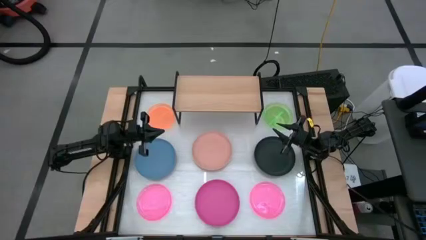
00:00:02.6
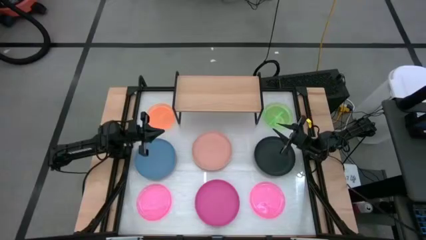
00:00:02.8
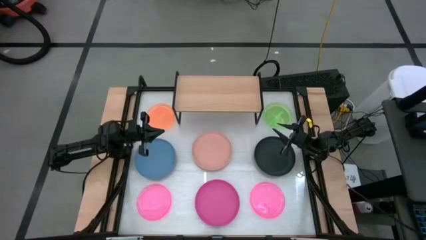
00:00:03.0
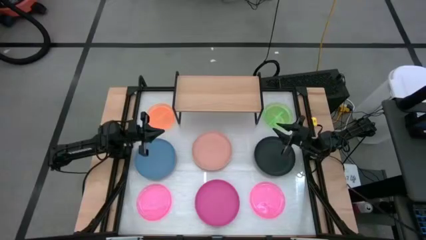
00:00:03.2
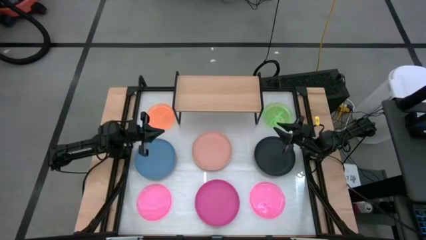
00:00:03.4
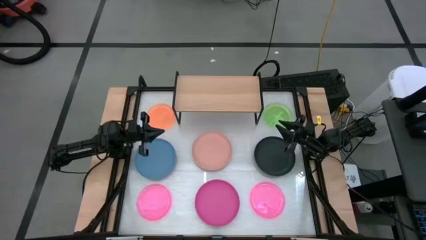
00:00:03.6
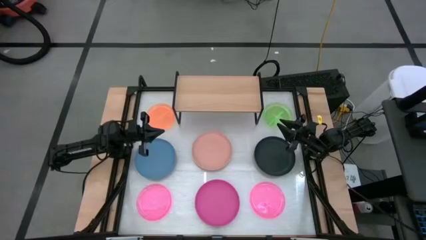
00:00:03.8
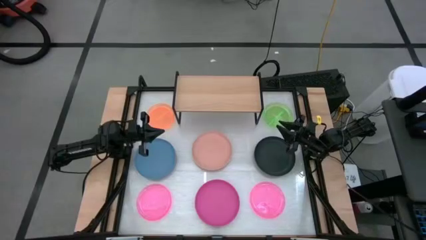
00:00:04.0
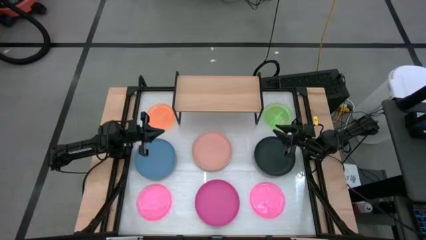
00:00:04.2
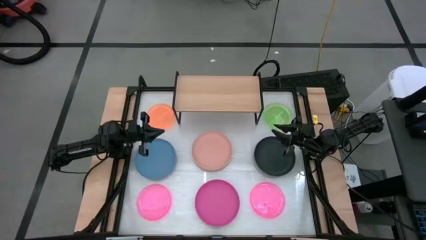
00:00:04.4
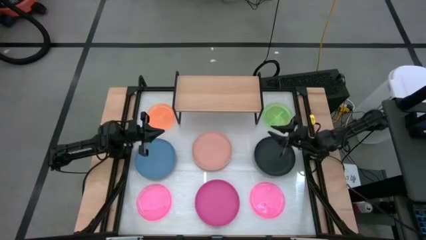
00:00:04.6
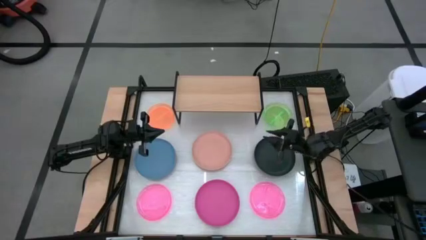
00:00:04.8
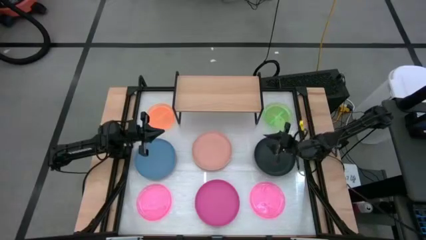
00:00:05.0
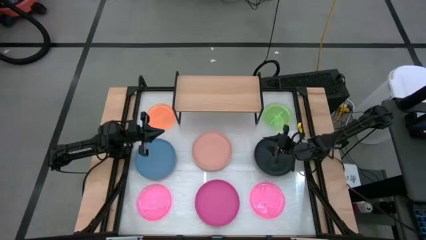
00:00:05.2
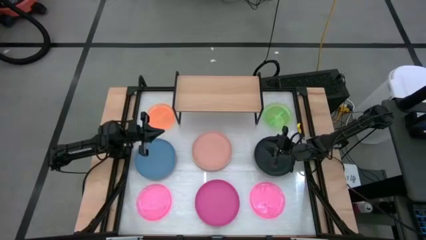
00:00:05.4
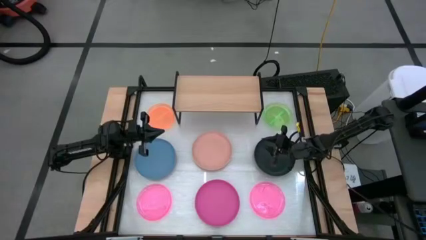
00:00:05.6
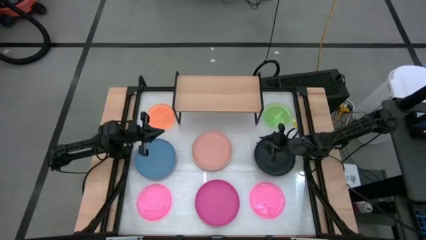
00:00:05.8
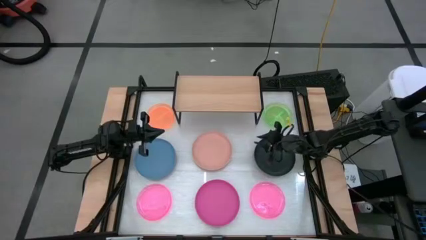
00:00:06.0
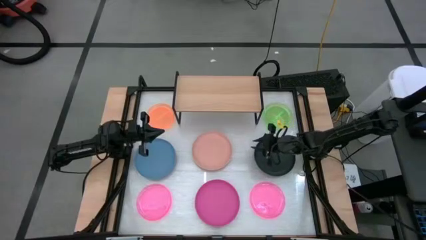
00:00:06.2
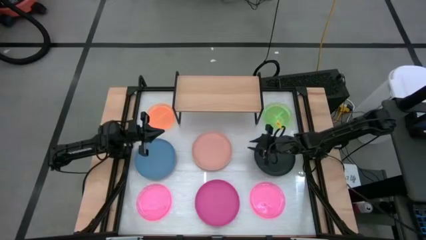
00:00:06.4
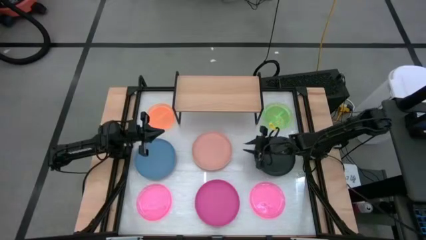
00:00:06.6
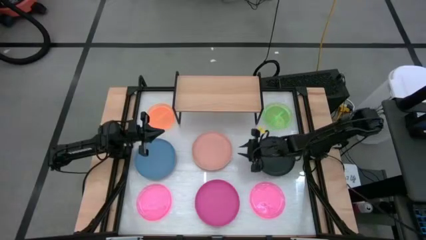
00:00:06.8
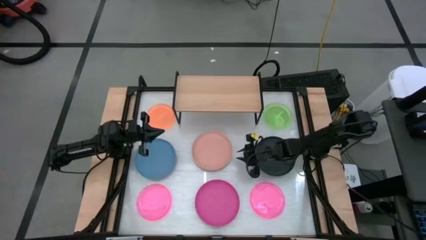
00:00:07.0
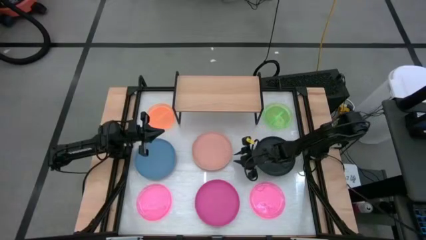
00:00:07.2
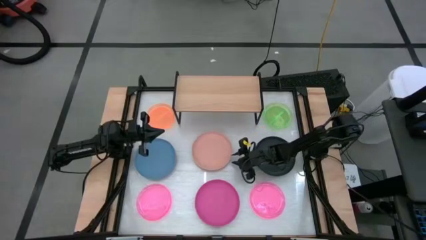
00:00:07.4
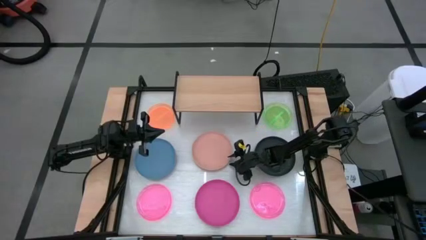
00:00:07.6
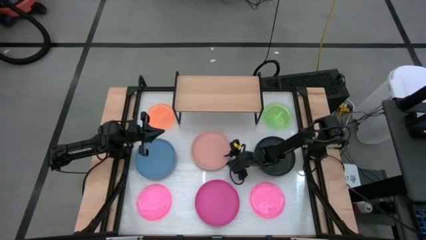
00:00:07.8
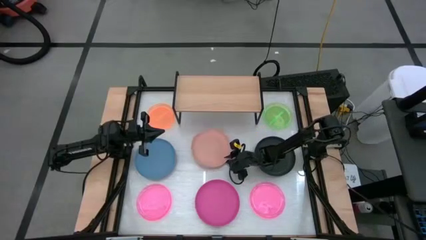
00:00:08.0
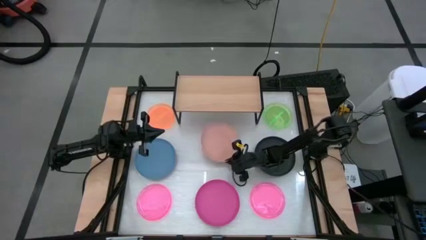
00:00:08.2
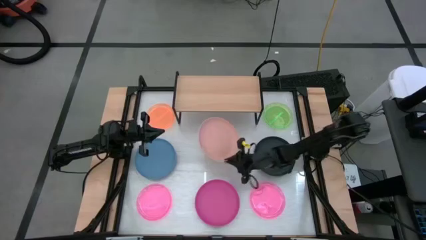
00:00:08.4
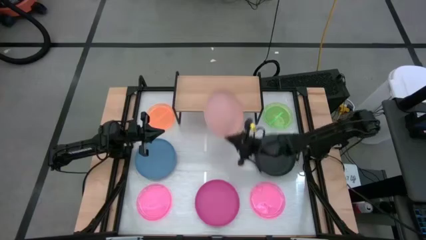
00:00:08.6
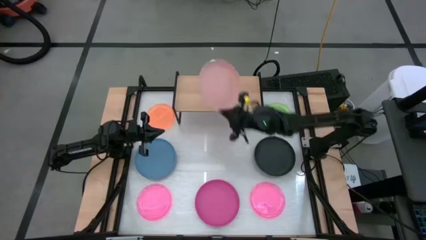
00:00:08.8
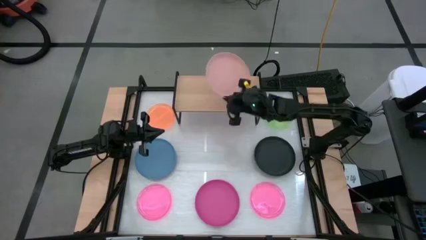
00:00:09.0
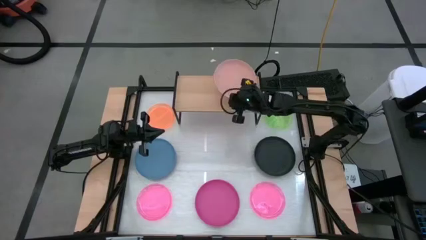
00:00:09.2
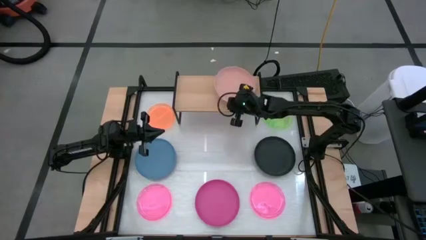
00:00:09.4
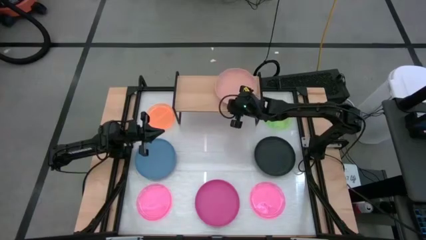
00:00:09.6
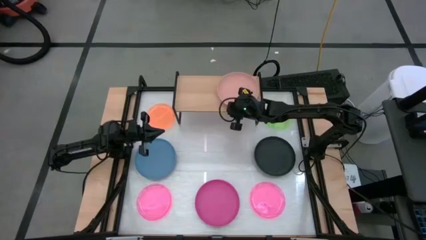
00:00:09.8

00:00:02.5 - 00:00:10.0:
Task: Place and stack plates onto a shelf
Put the large light pink plate on the shelf

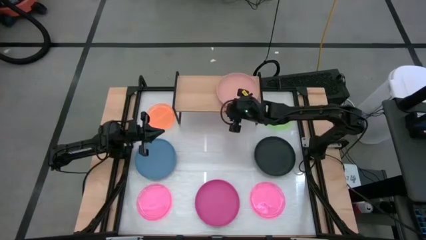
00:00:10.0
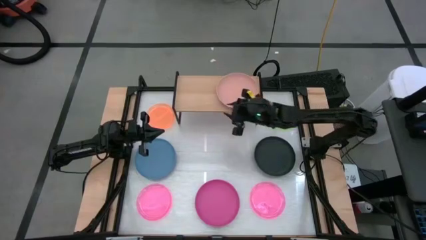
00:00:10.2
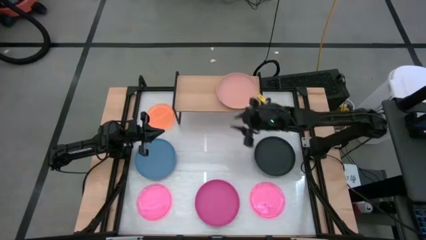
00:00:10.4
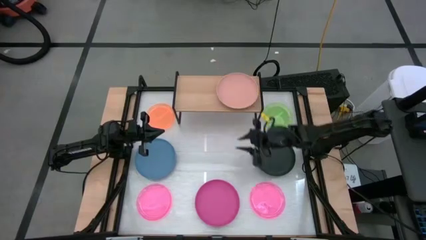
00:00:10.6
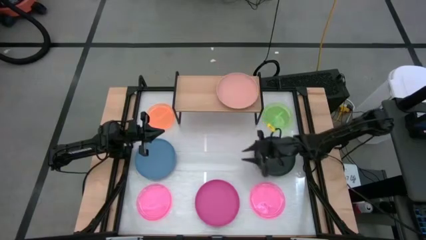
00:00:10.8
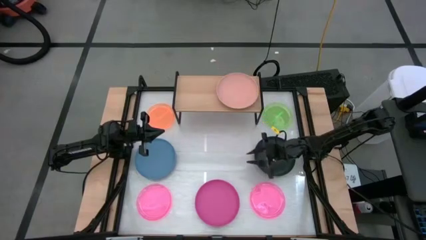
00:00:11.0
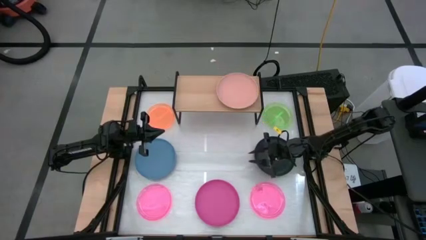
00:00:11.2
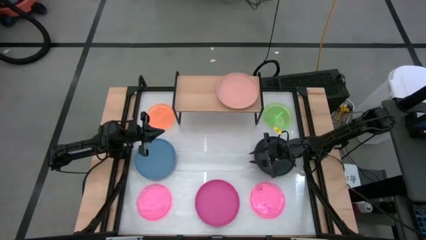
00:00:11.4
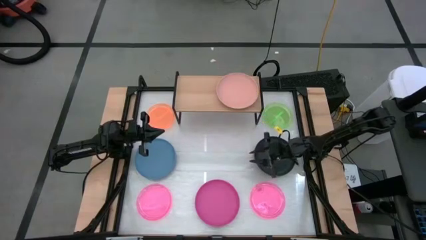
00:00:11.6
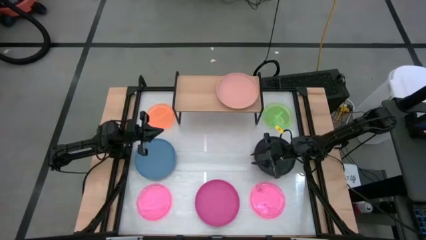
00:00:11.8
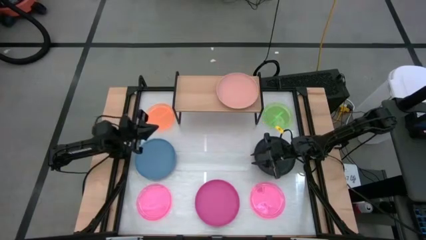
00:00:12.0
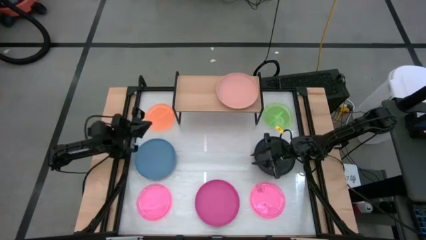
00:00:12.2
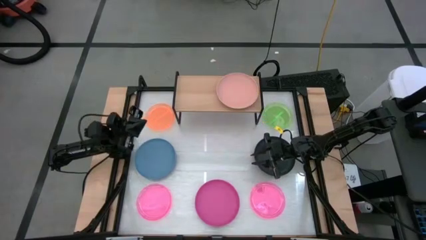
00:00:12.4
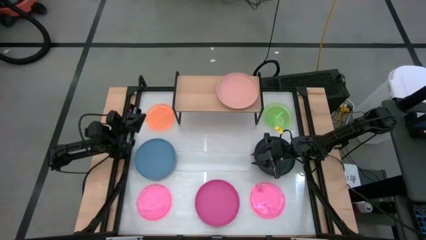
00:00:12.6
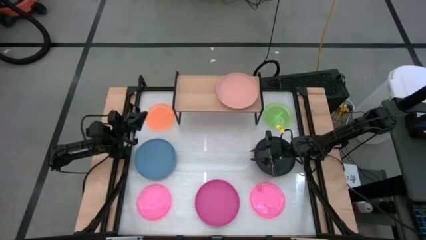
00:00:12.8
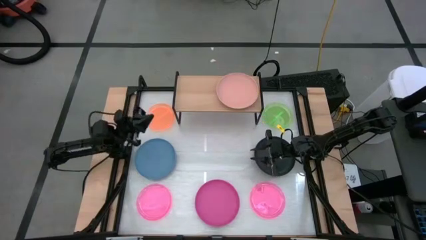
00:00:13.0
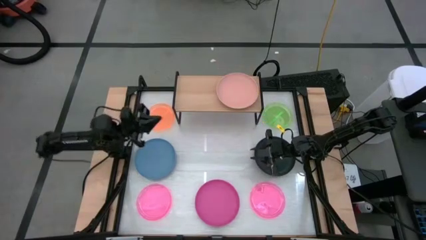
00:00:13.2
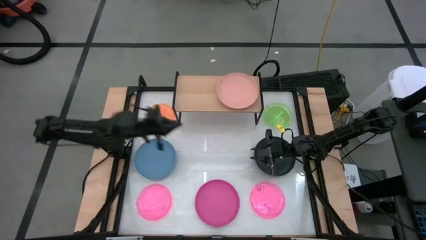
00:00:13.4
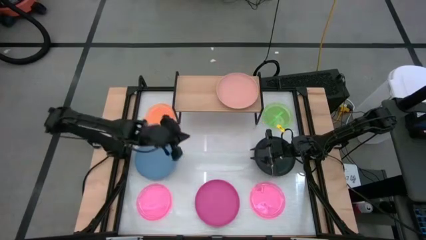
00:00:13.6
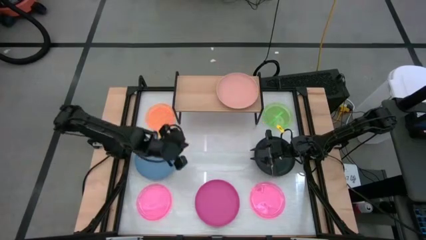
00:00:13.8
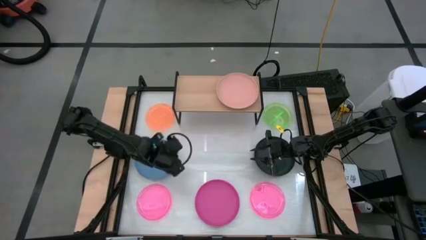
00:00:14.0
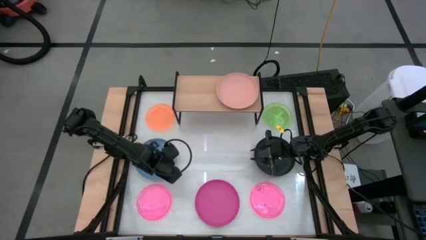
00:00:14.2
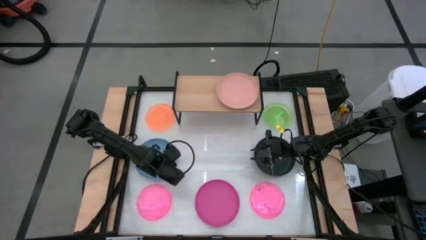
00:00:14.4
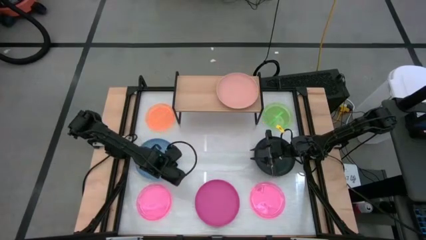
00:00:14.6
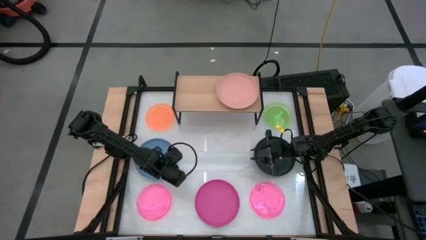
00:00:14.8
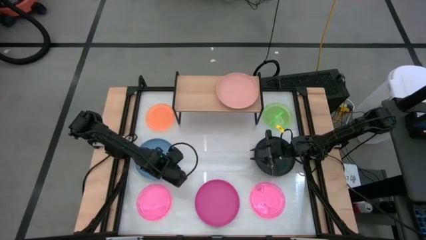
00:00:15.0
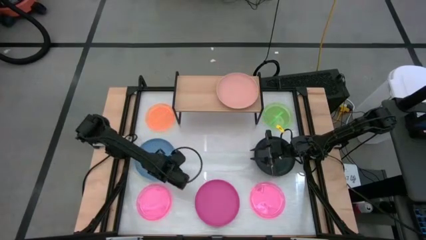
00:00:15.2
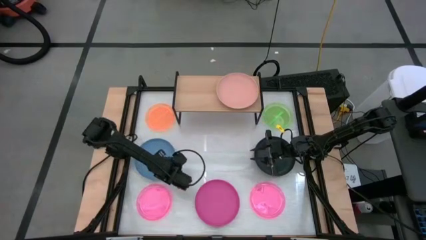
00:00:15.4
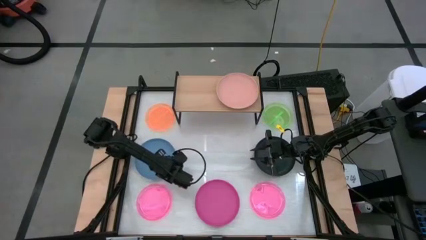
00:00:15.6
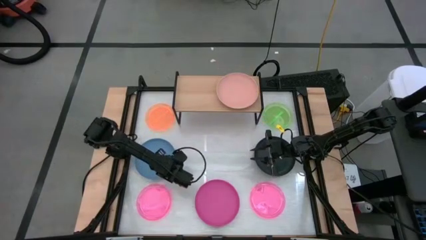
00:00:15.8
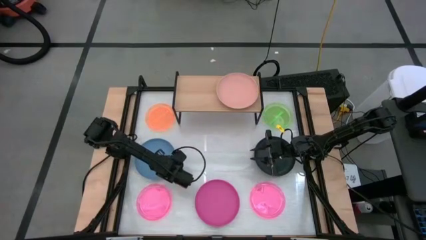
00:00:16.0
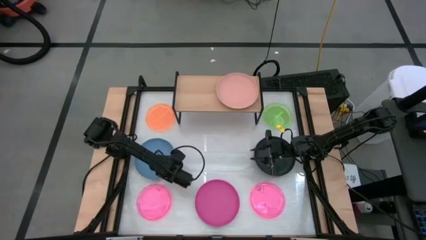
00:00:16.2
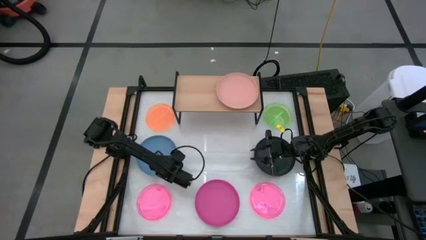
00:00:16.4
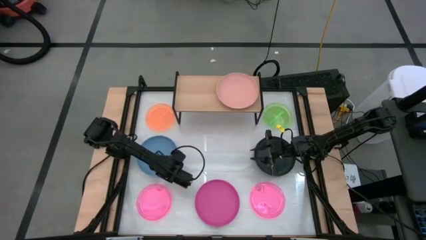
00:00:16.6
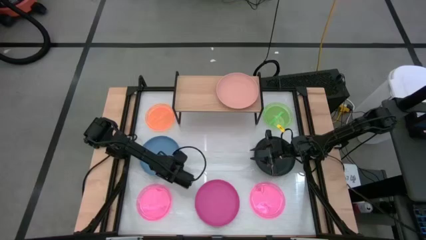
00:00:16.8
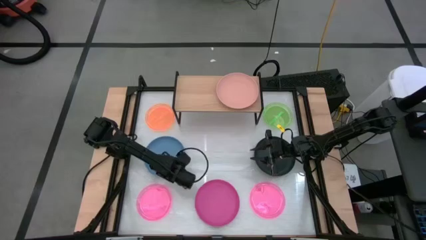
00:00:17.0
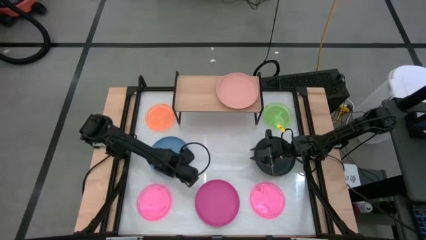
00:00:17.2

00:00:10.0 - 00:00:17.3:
Stack the large blue plate on top of the large light pink plate on the shelf
